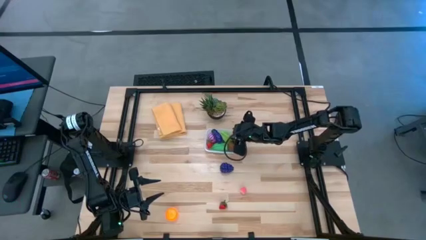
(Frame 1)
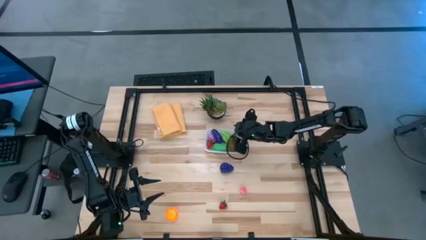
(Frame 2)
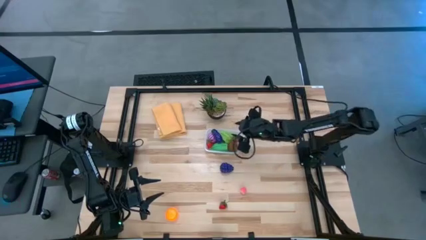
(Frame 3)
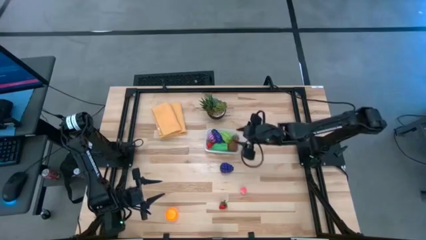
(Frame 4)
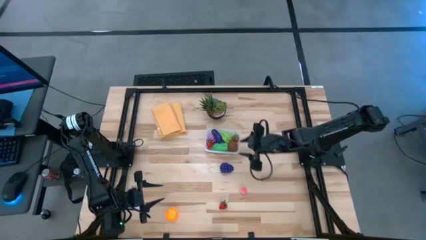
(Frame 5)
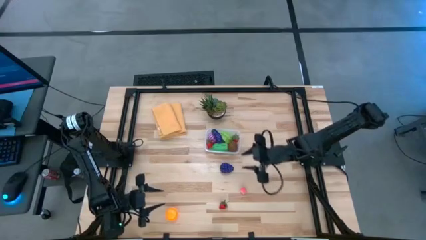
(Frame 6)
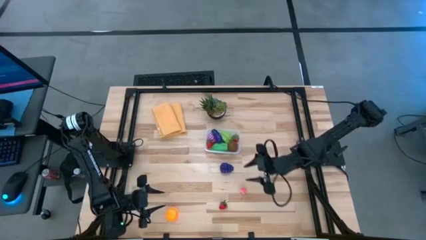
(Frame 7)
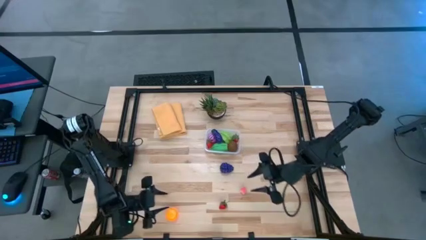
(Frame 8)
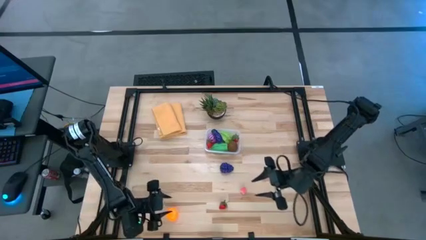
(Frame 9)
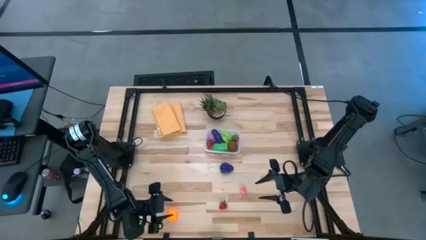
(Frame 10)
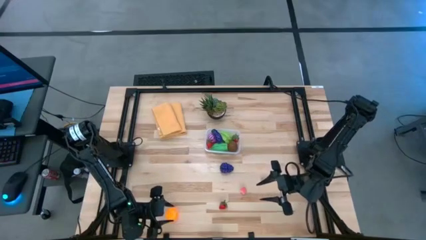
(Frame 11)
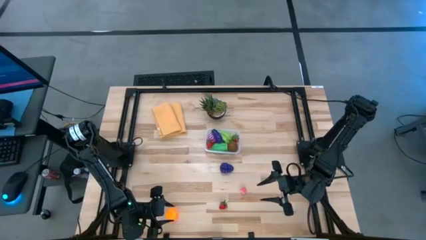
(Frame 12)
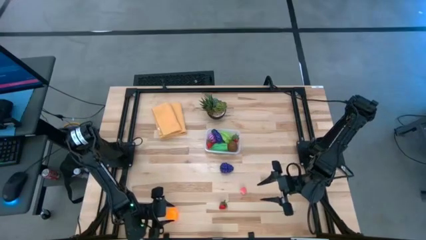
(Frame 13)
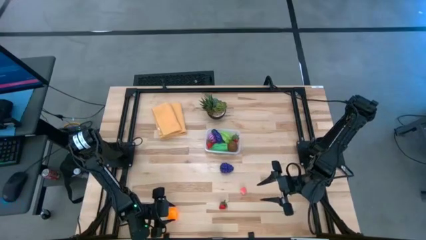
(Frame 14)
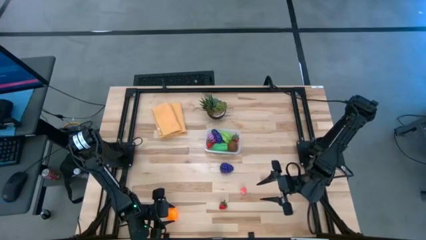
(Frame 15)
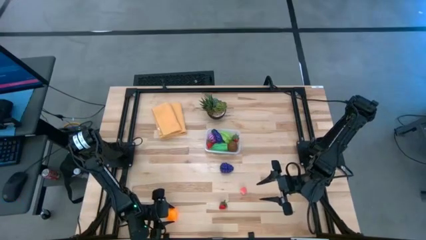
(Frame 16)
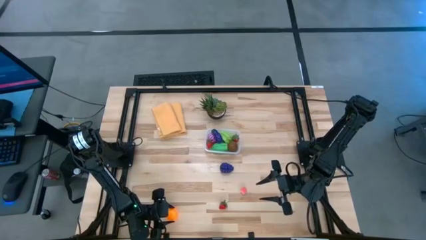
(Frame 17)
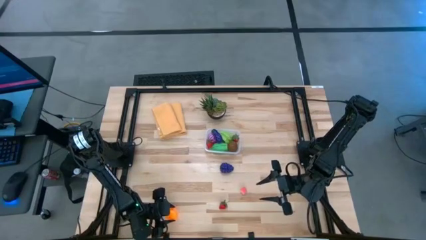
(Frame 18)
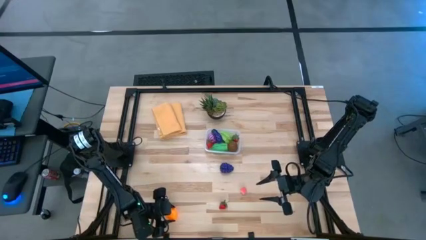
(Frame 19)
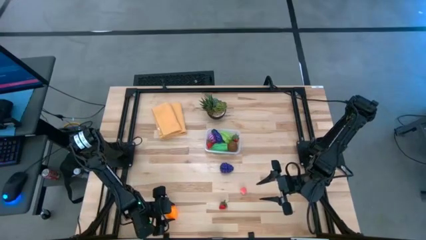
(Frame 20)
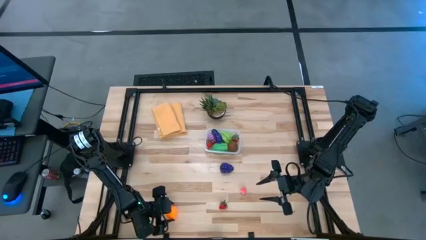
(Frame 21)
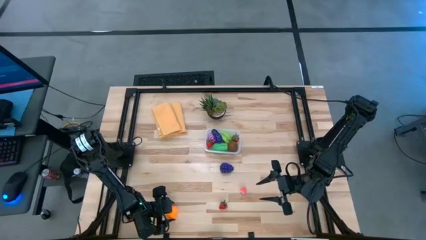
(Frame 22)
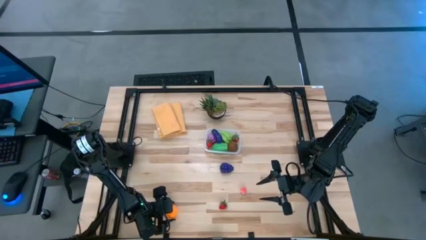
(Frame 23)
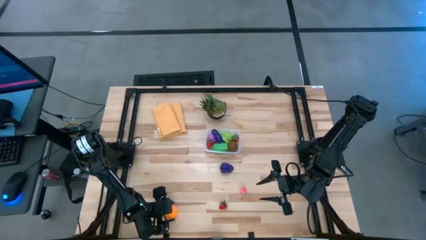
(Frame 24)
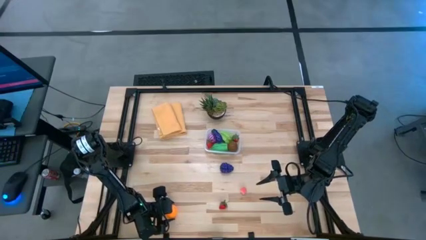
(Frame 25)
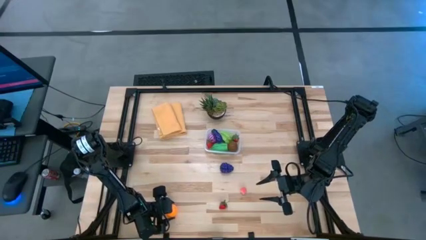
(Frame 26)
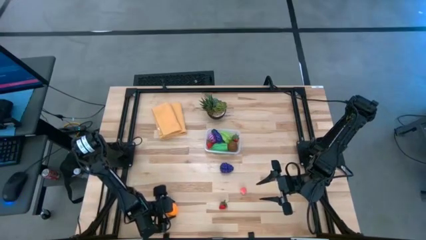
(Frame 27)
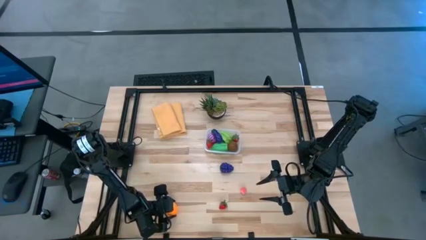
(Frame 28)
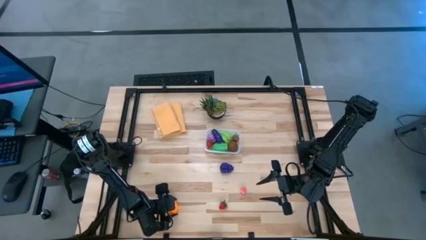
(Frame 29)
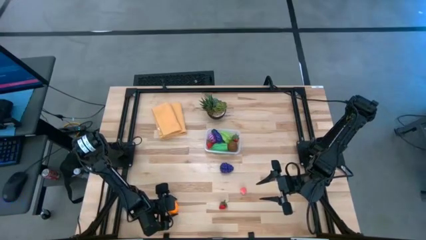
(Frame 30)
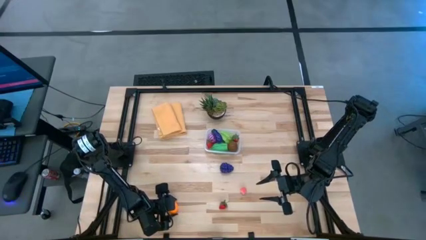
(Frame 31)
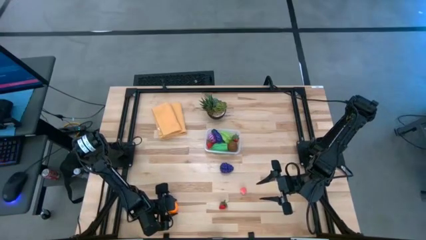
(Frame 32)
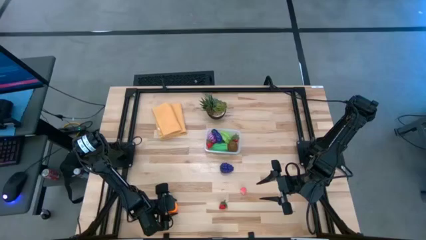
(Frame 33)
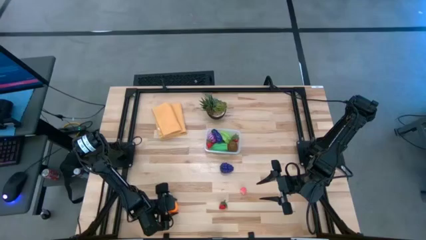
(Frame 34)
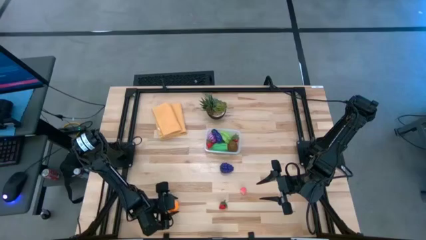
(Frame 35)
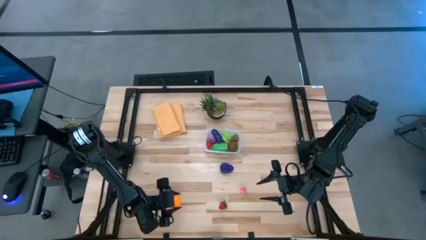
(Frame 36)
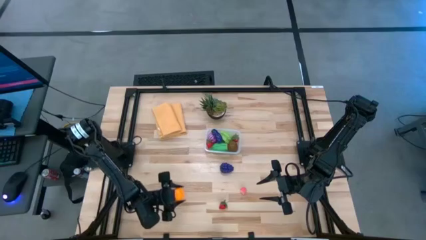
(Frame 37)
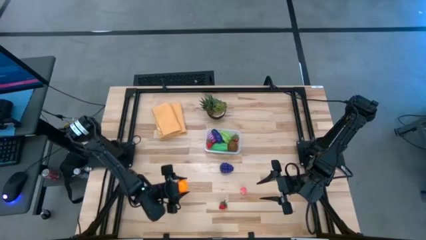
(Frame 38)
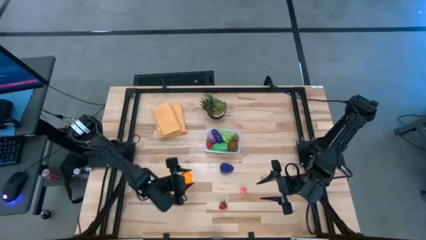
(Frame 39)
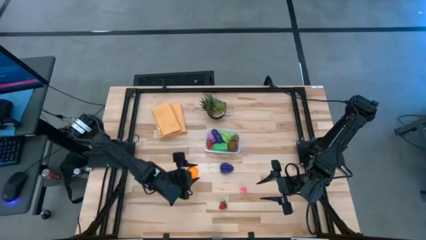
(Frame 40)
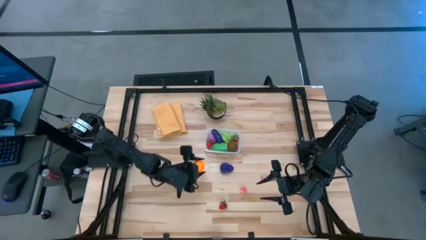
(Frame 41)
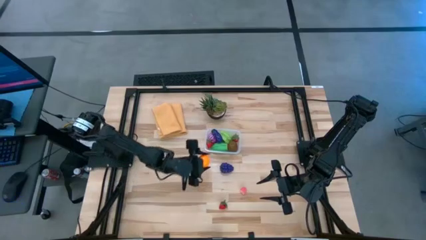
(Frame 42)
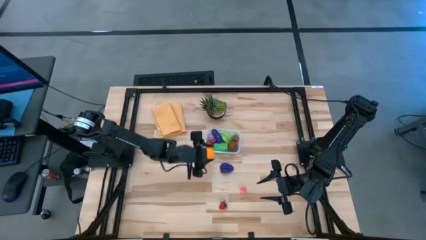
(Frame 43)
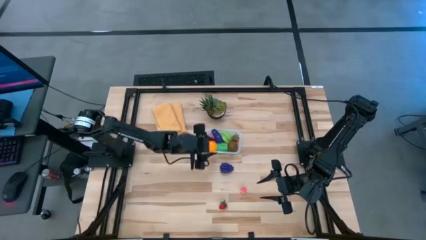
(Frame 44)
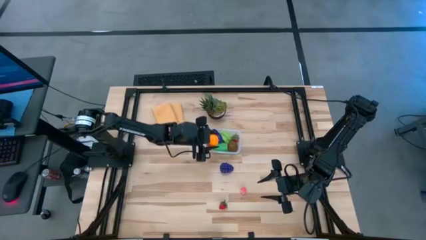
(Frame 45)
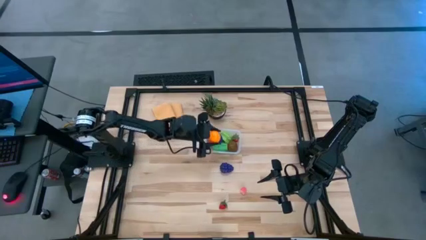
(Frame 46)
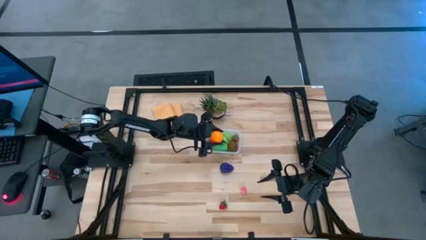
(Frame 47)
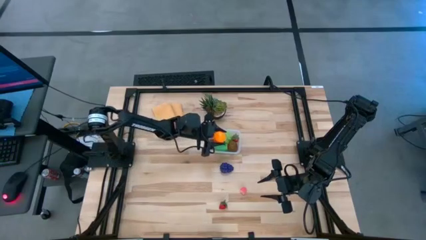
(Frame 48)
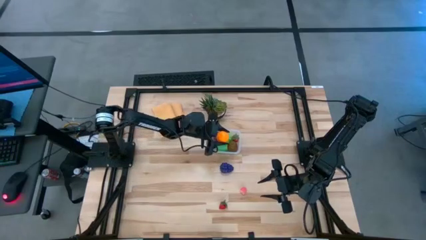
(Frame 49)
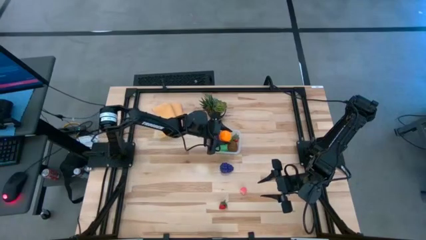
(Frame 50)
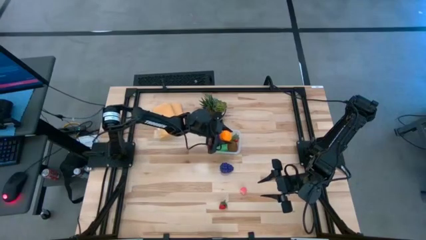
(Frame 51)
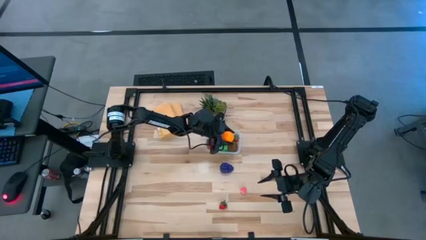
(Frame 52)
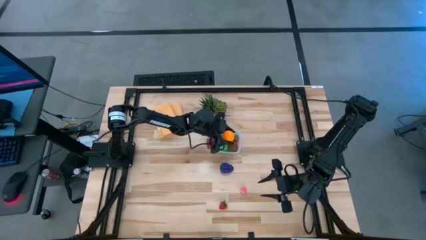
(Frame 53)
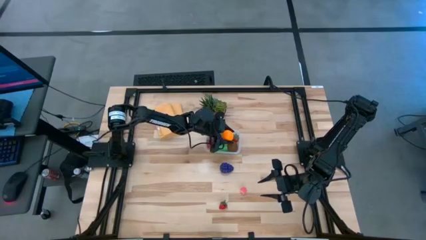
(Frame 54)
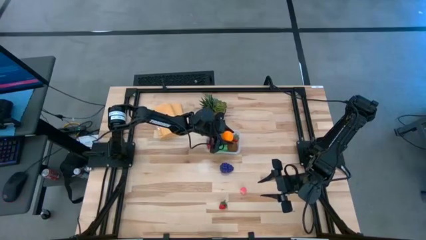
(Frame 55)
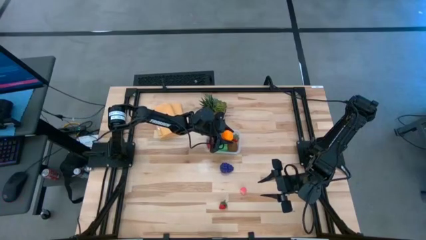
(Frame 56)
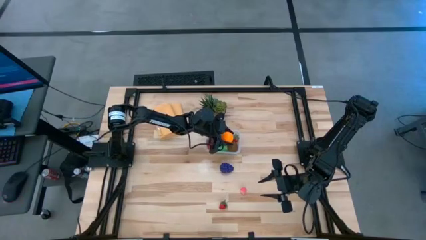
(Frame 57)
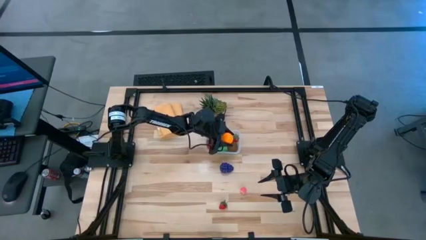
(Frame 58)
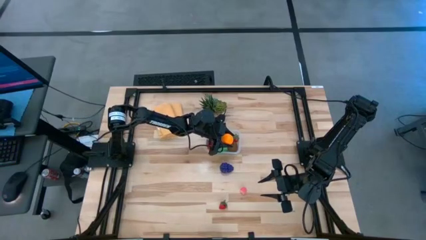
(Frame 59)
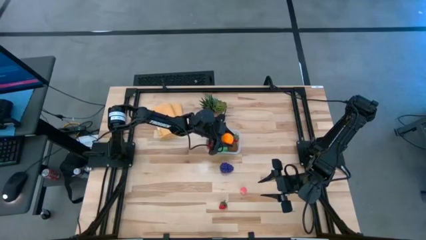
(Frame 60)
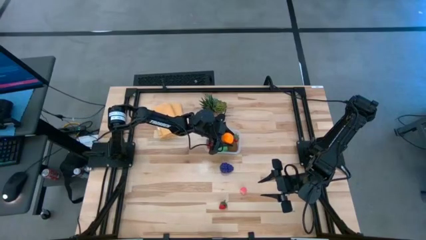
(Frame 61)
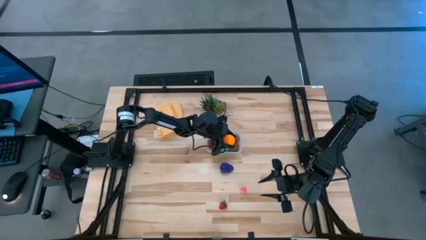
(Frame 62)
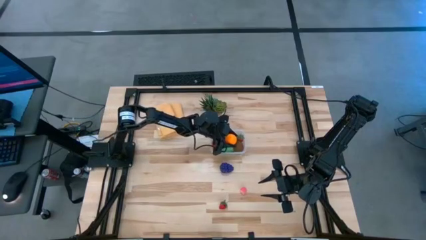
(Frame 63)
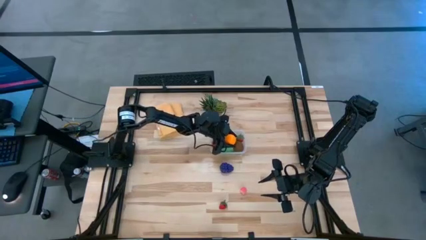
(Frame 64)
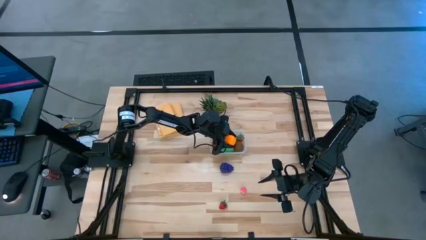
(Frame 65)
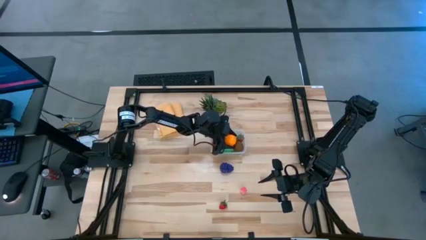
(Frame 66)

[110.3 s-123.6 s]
Task: Pick and placing Produce into tupperware
Put the orange into the transparent container
